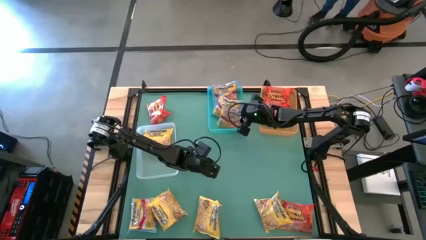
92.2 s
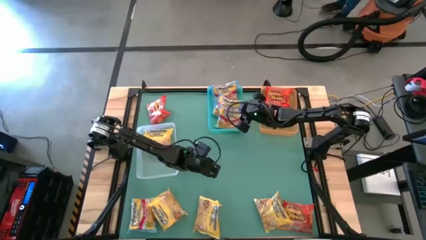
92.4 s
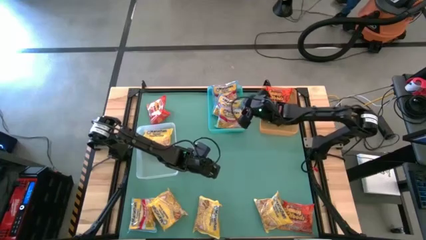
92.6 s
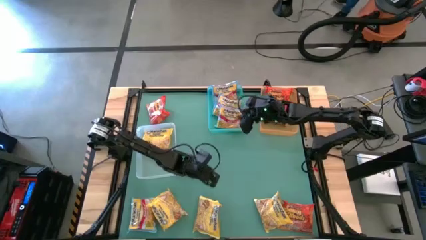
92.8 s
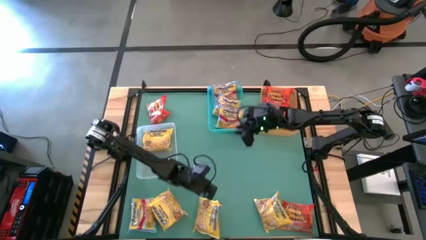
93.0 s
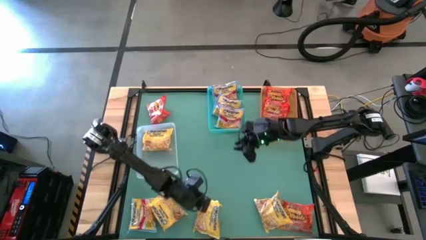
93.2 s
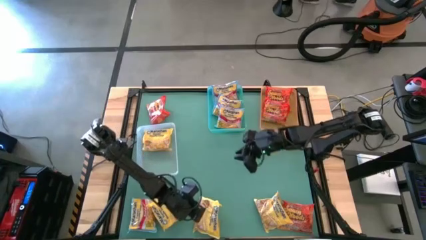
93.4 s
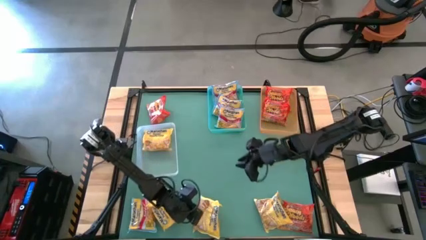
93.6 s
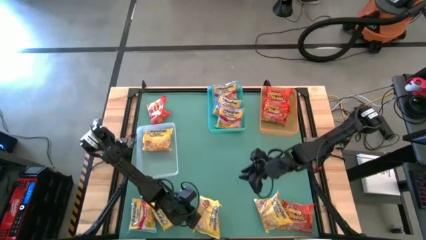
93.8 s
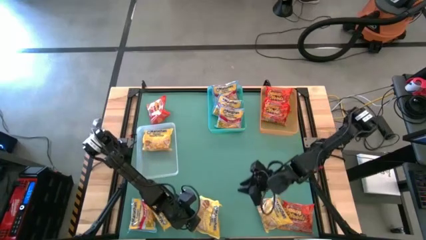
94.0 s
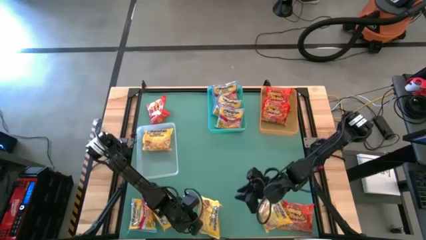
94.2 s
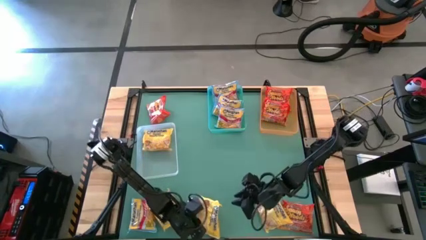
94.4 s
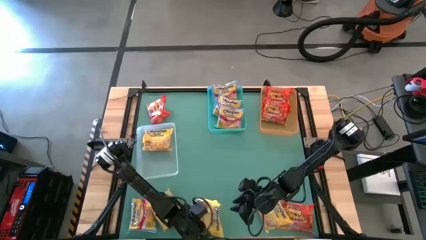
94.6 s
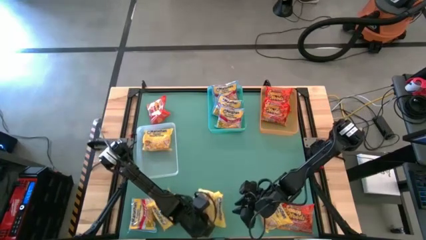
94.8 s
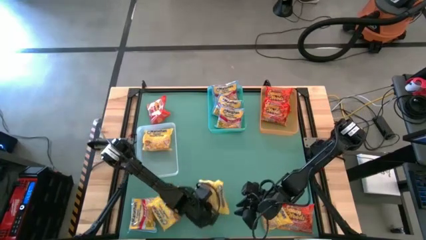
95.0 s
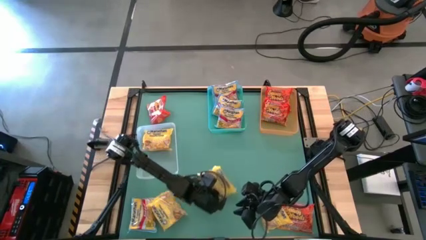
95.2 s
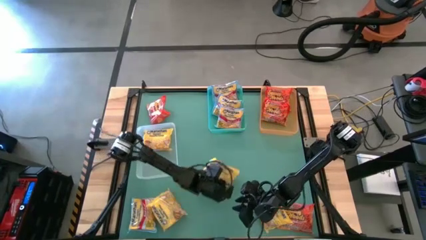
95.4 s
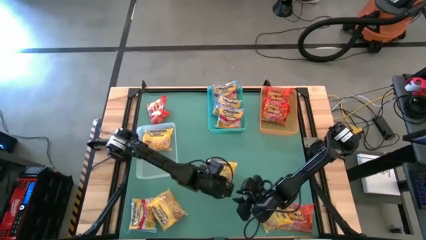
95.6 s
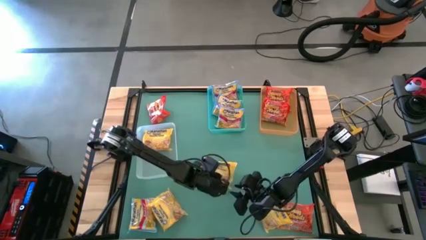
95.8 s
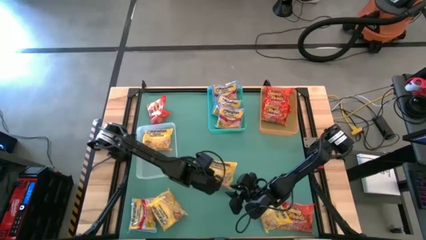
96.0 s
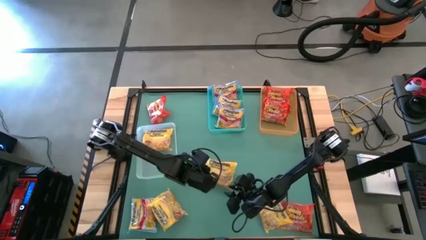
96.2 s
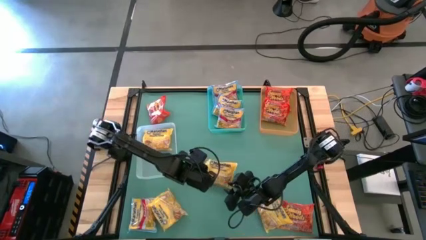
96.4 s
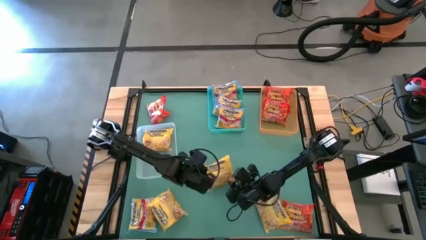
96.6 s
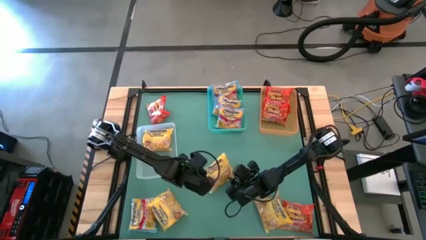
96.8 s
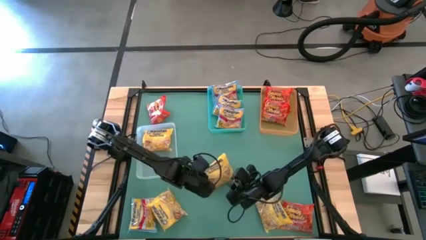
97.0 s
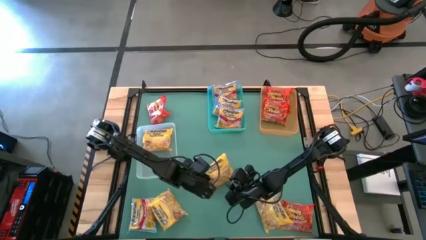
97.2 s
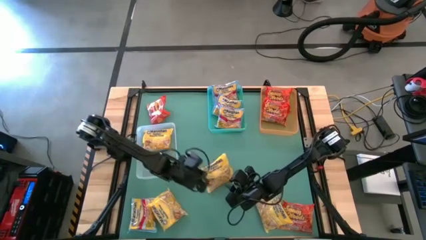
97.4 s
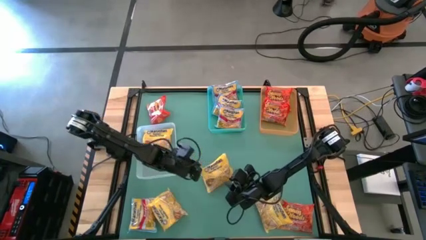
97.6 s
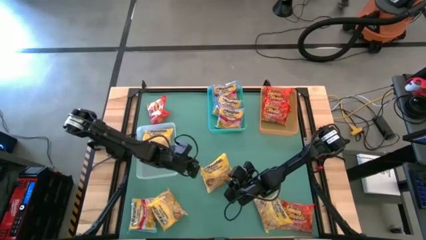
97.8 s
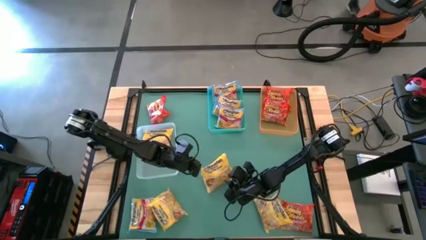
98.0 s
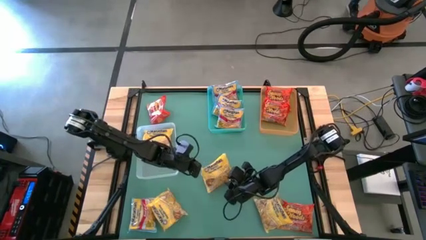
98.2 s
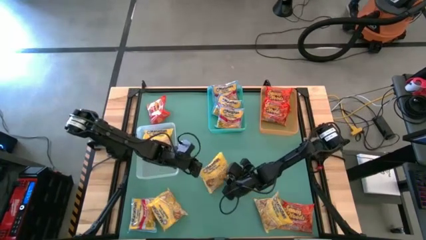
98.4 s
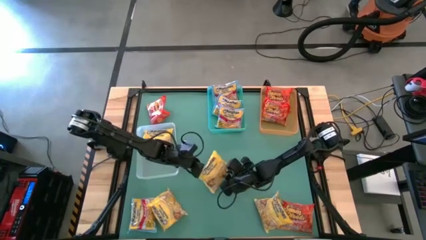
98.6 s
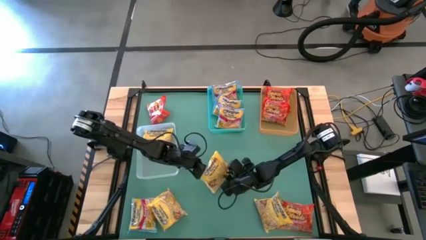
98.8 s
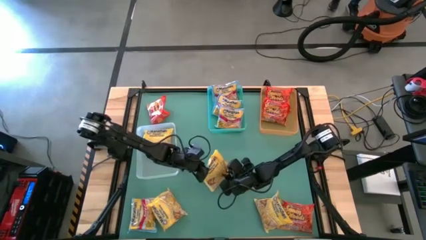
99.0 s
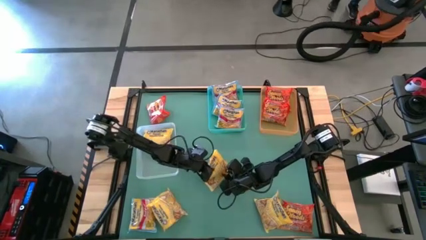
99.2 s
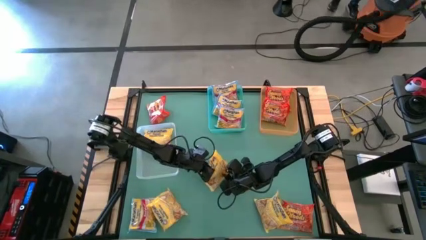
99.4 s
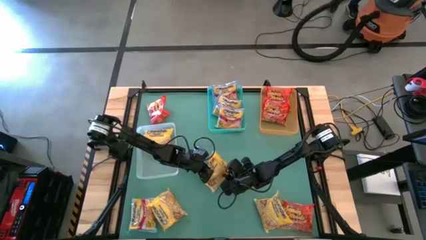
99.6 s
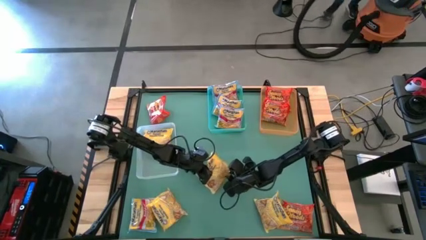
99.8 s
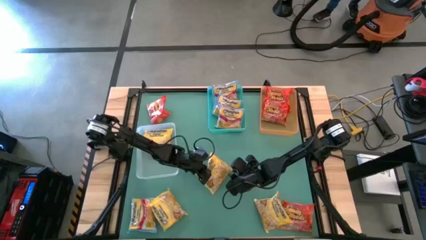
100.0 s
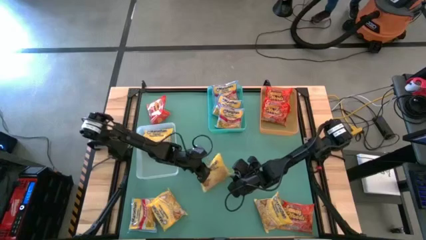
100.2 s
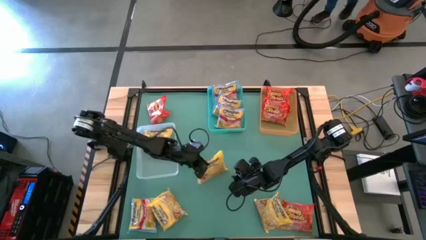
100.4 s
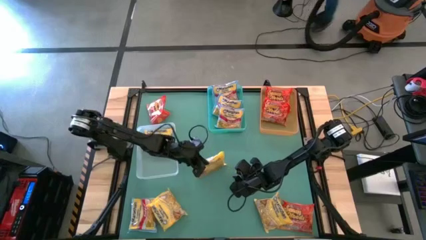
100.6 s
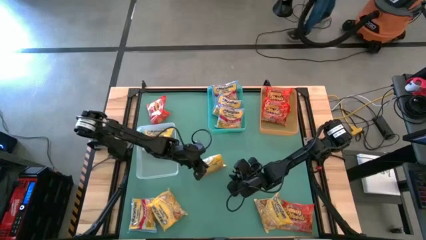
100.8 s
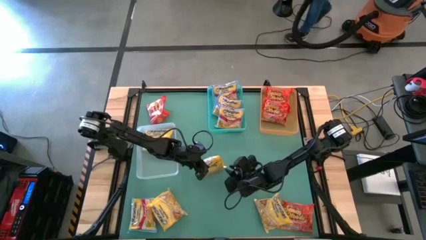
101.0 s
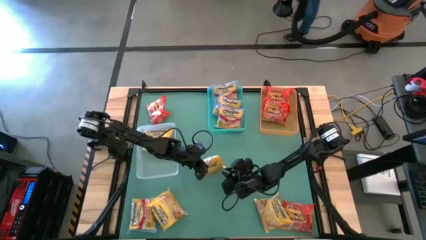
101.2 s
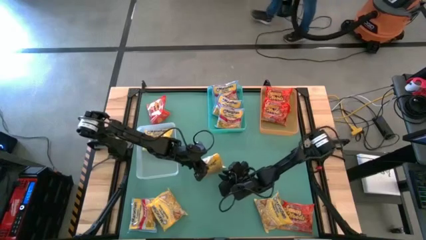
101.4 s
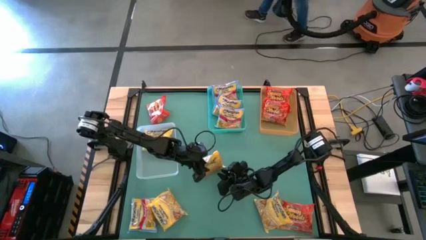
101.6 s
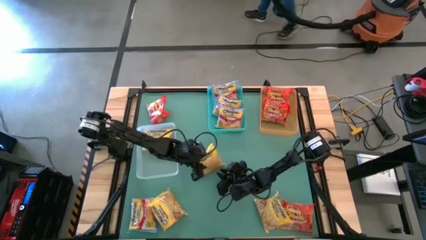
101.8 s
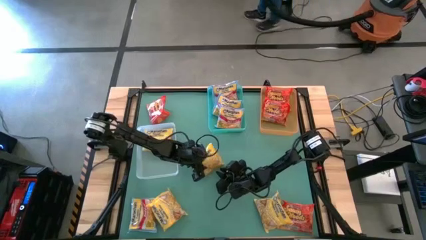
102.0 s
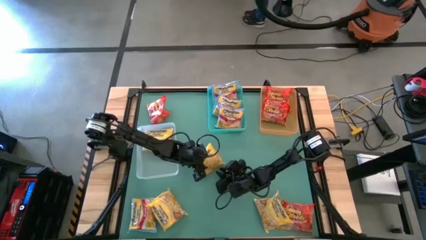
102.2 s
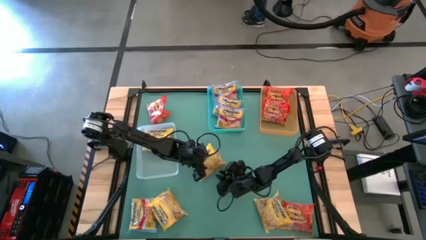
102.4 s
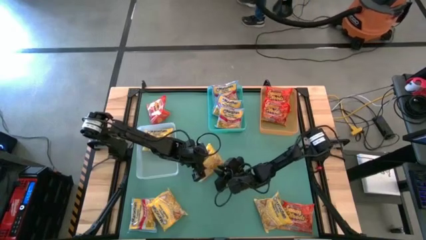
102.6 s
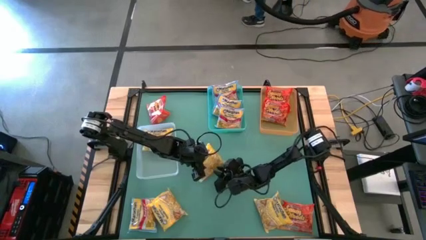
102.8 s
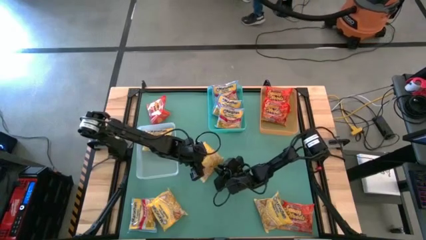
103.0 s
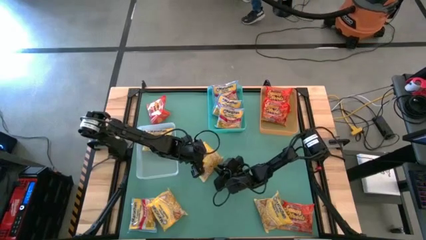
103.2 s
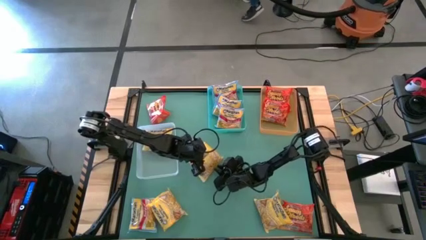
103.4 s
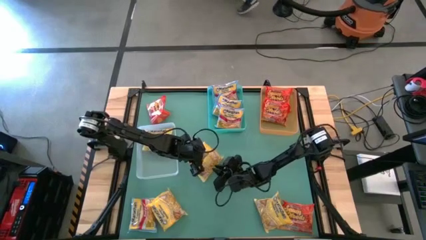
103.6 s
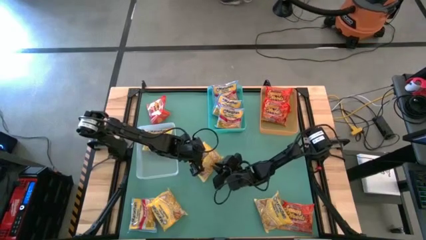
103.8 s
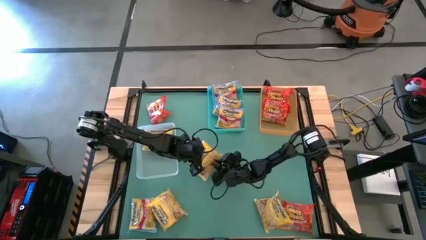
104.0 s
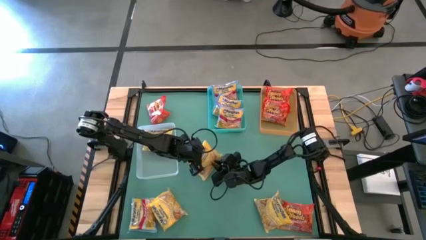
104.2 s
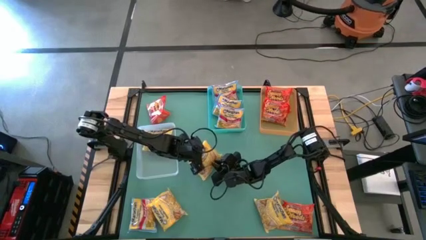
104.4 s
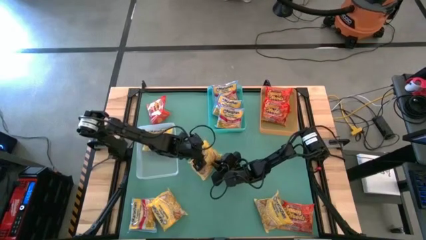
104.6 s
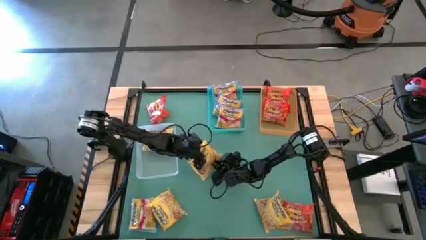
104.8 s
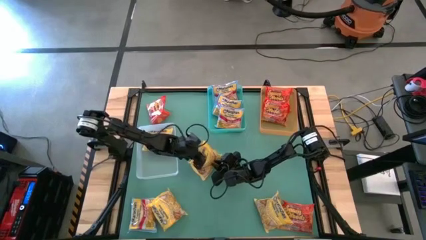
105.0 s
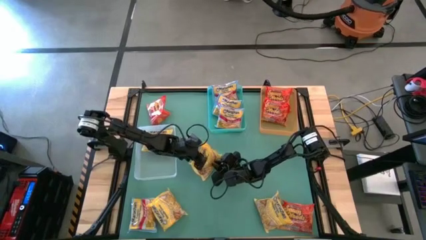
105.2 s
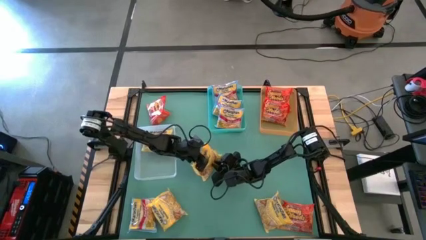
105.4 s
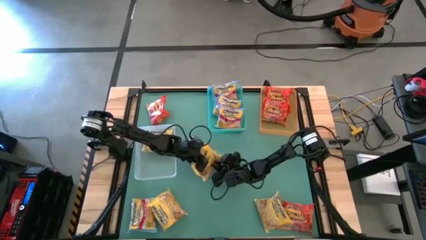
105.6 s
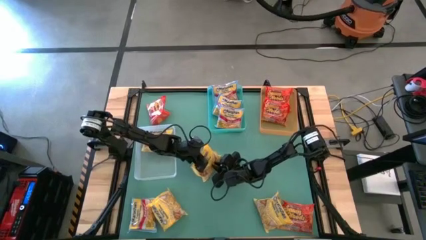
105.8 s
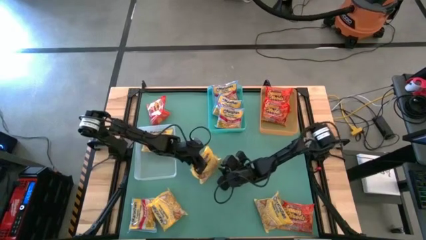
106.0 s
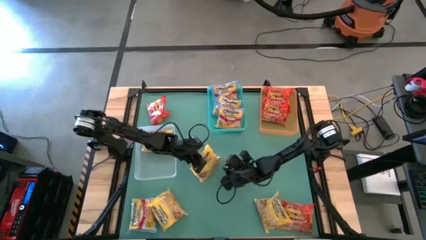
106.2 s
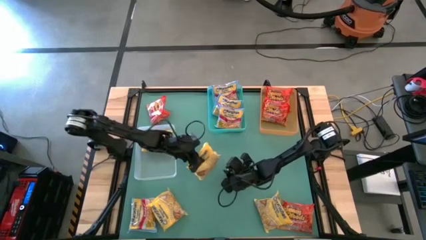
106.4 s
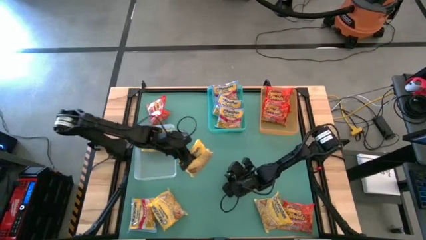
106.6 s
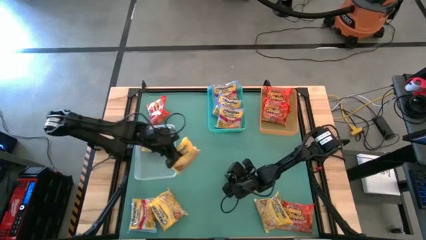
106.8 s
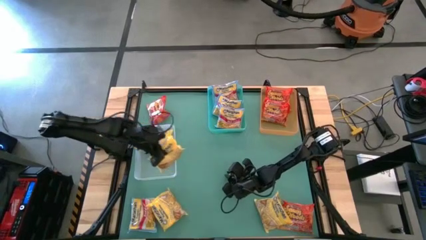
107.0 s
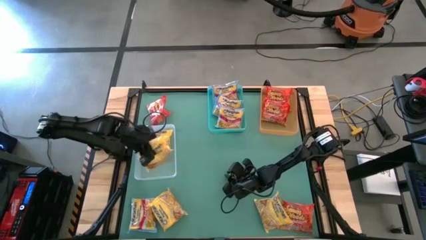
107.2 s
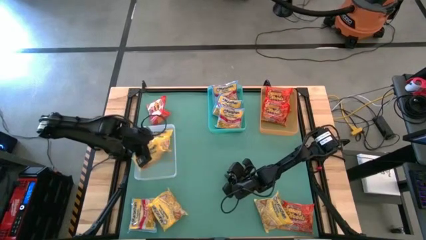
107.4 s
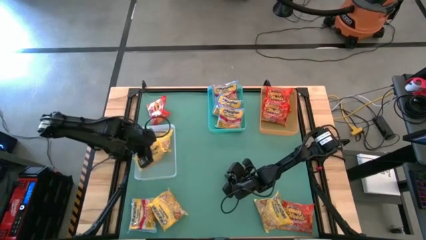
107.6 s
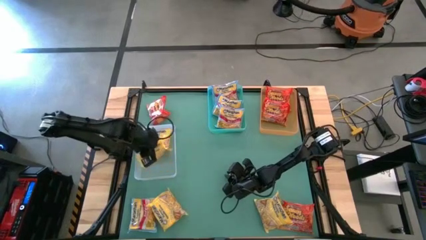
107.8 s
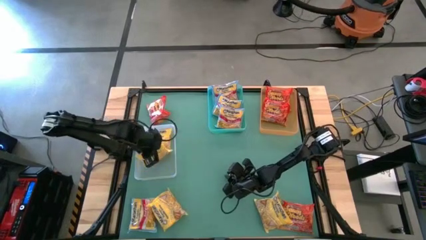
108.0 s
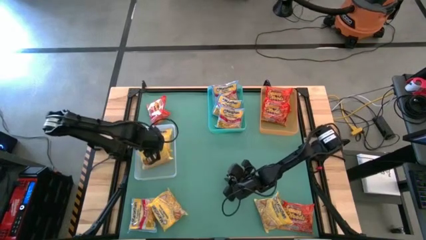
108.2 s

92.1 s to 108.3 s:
Task: Sort Maruchan noodles
Put the middle yellow noodle pack into the transparent bin
